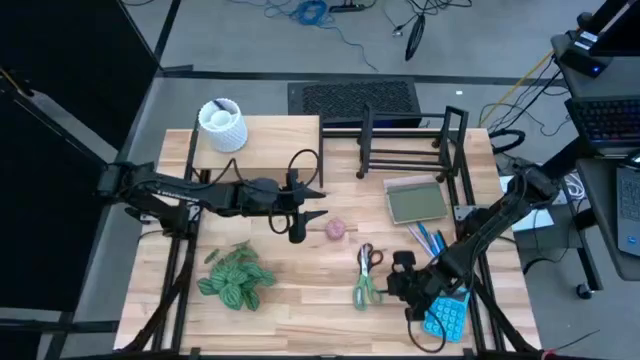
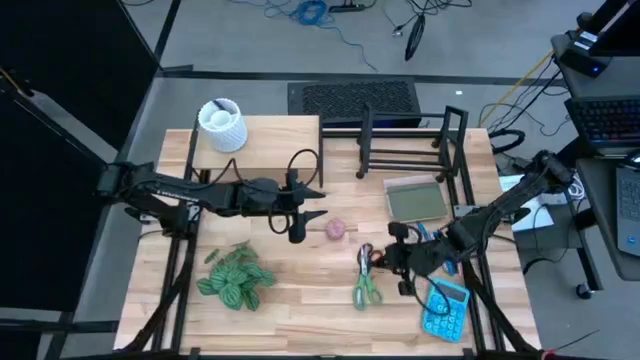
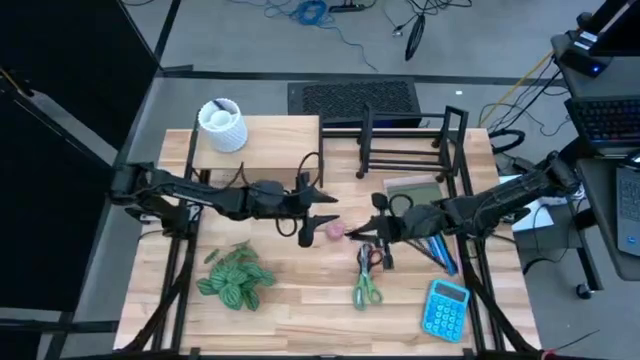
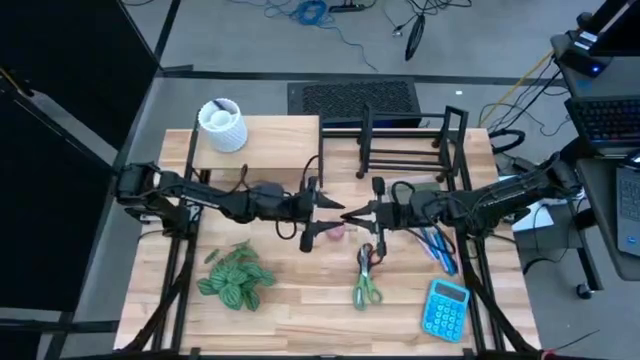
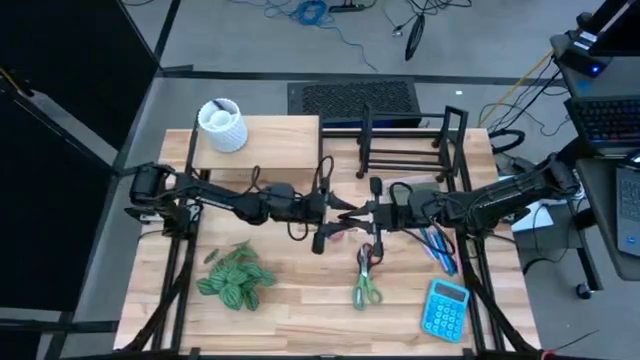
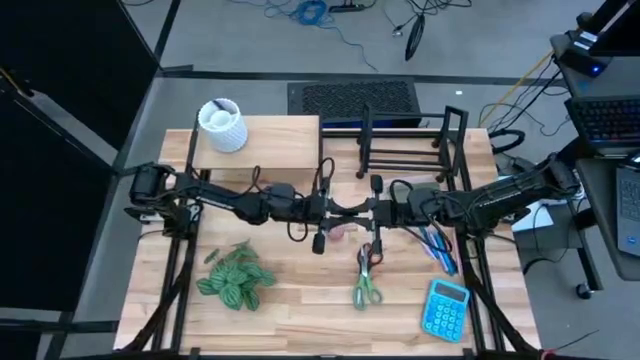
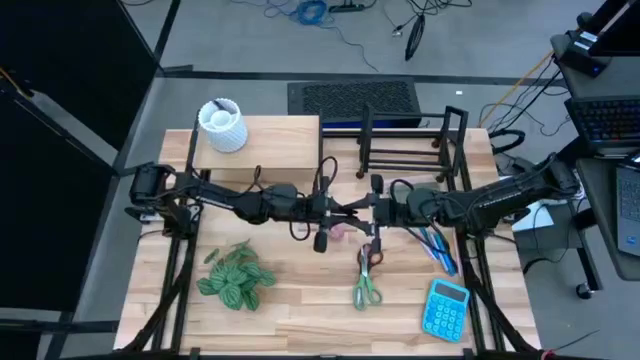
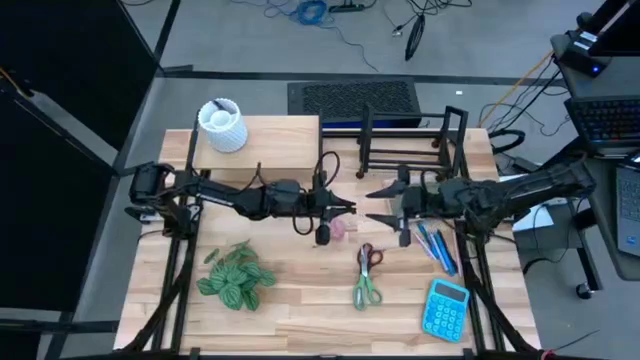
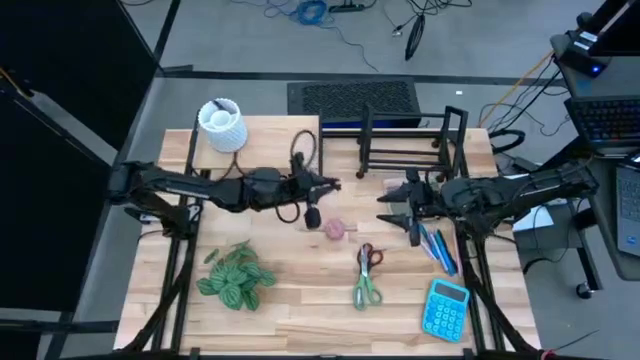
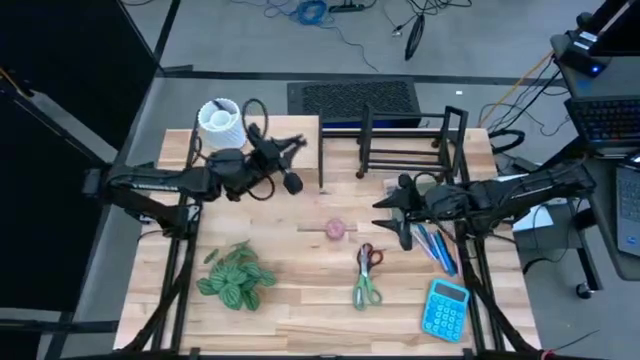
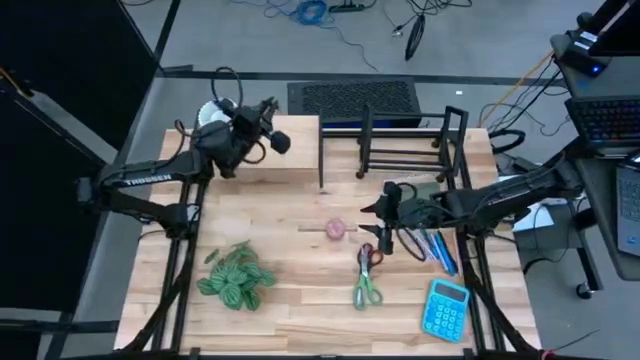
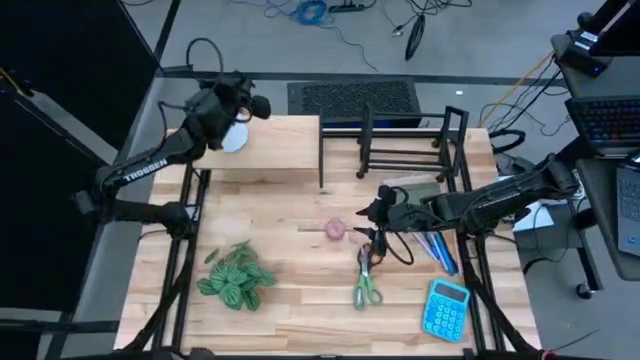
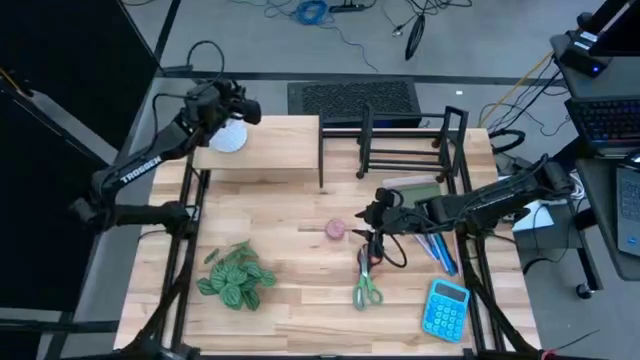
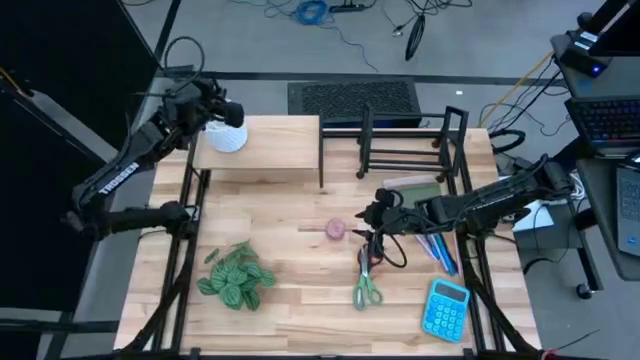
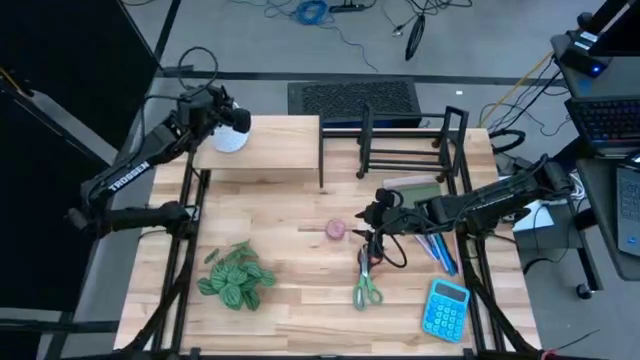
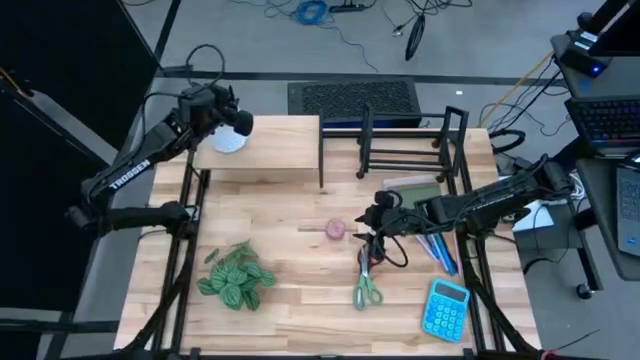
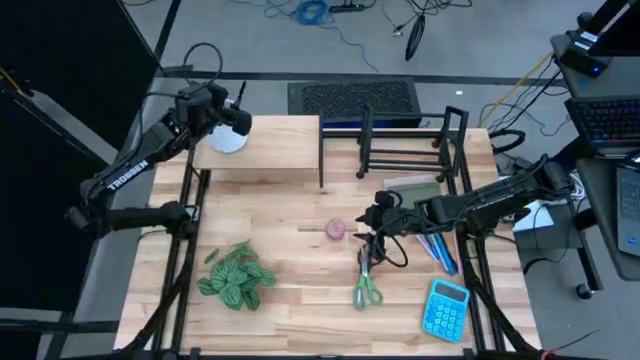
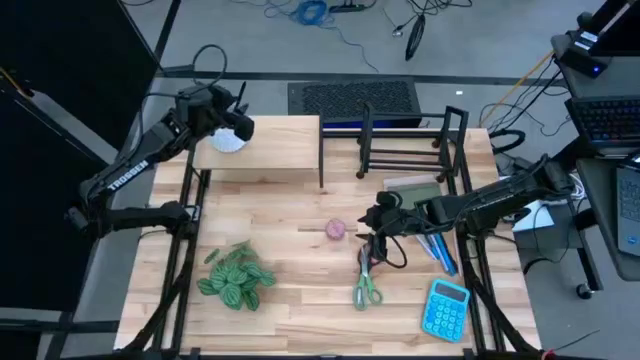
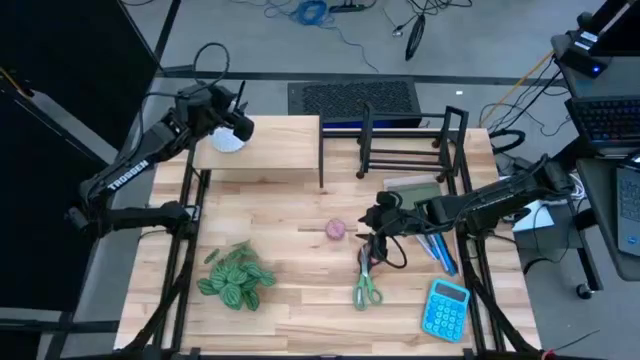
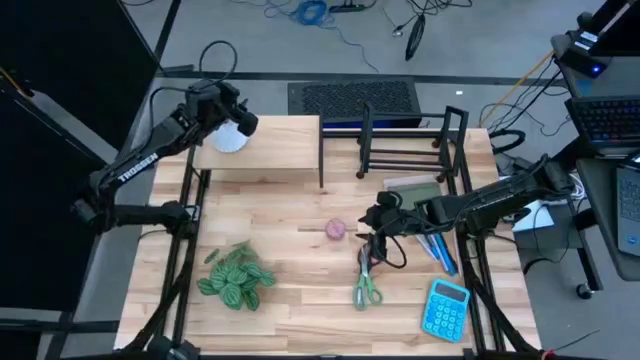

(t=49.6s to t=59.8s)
Task: Stock shelves
Put the black pen into the white pen holder

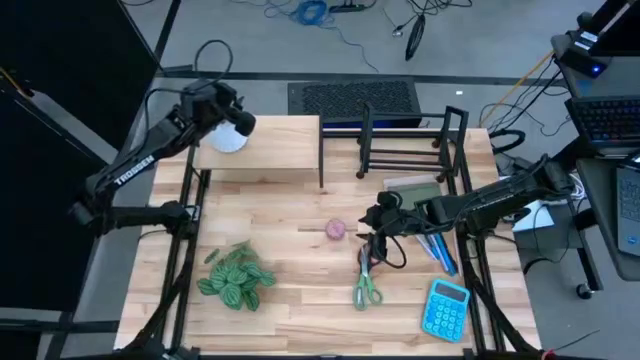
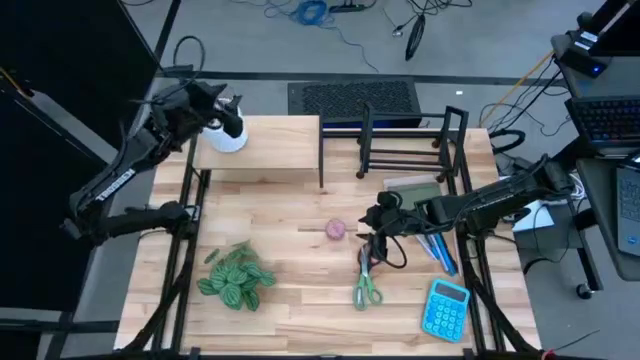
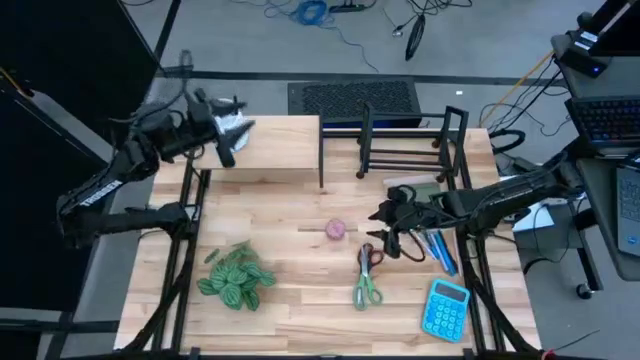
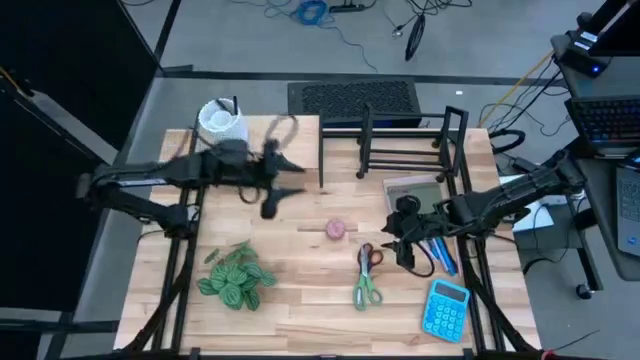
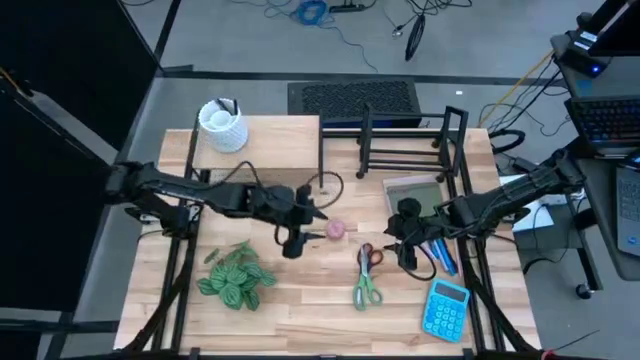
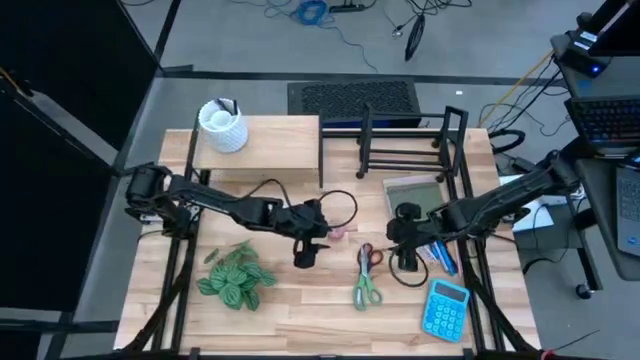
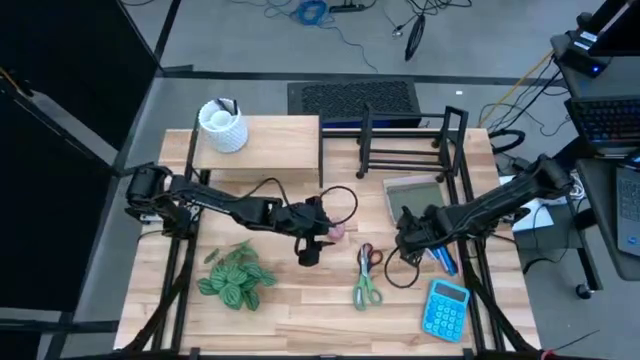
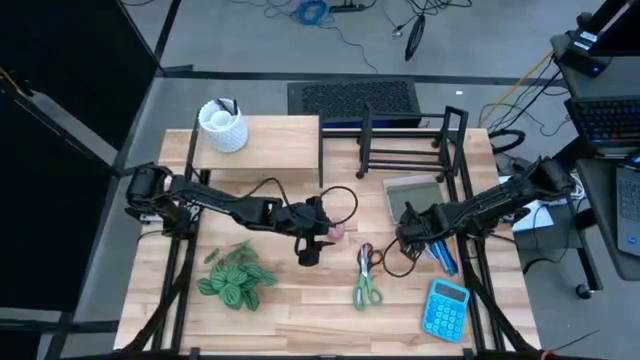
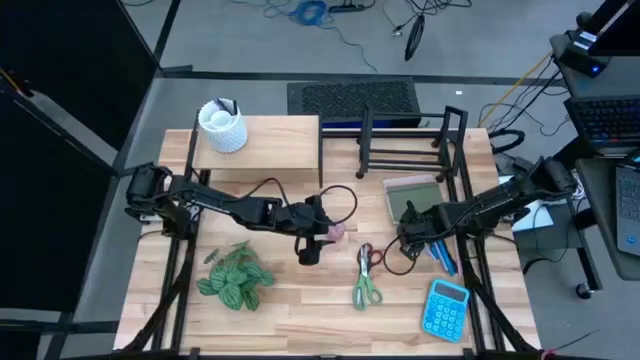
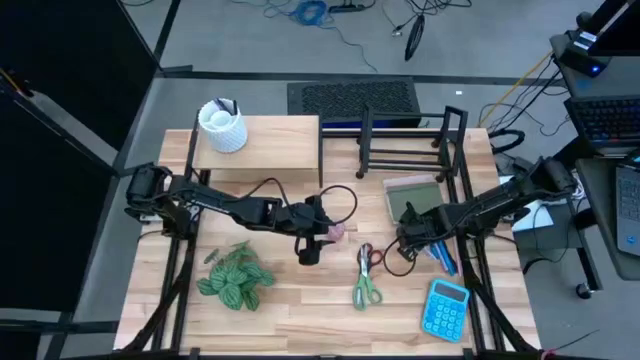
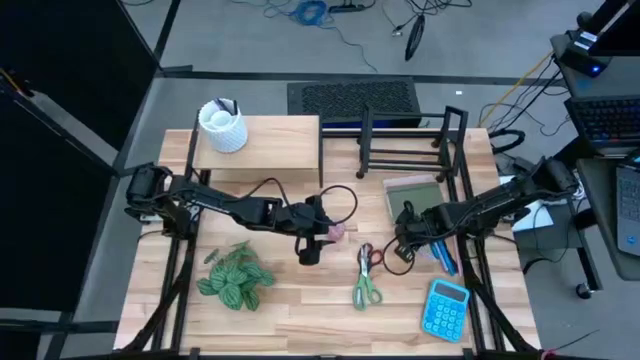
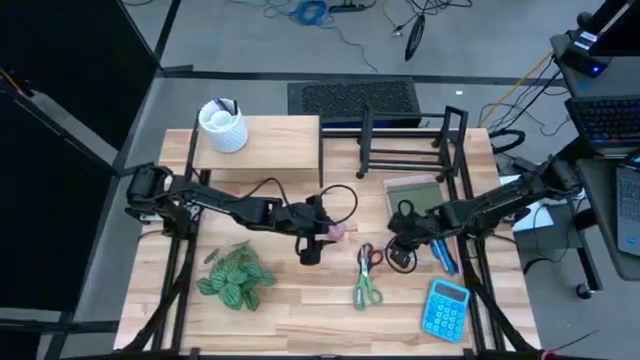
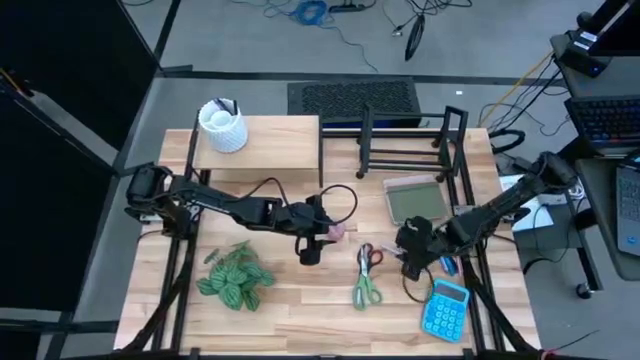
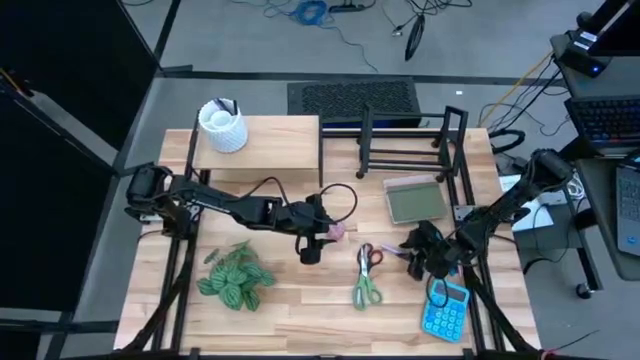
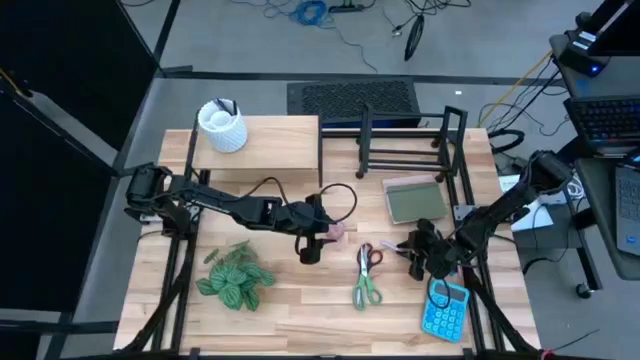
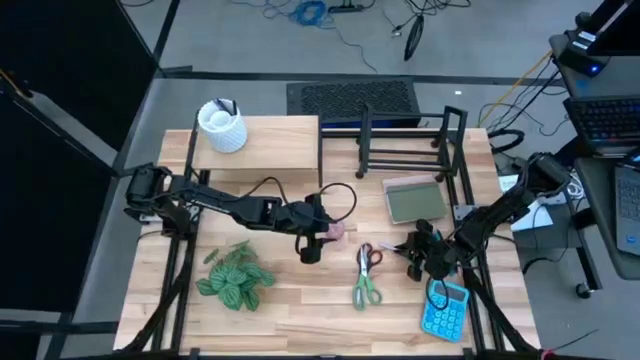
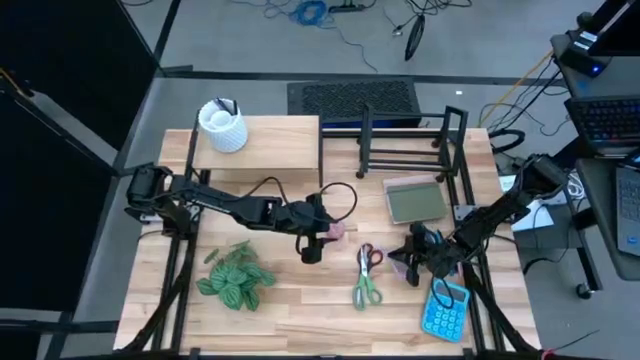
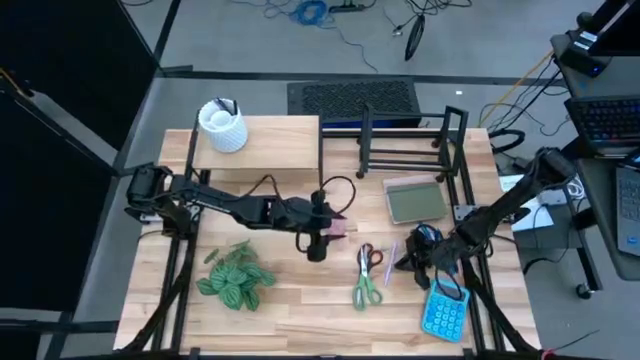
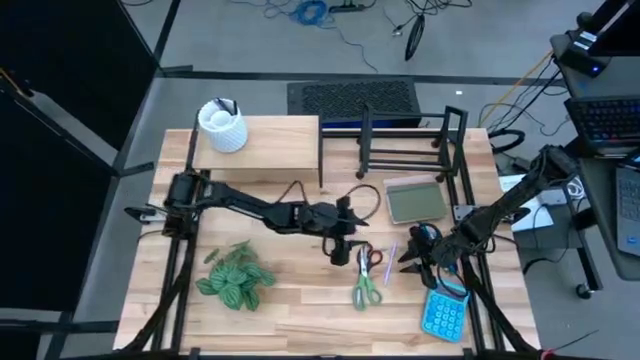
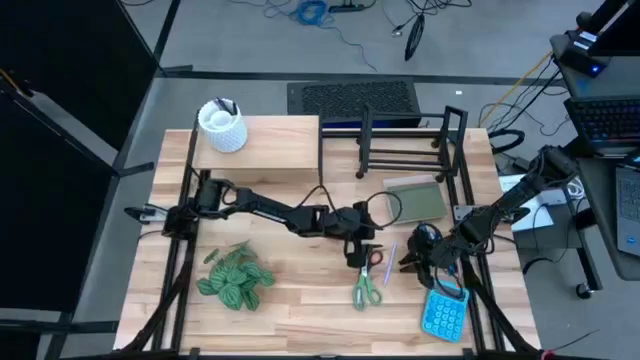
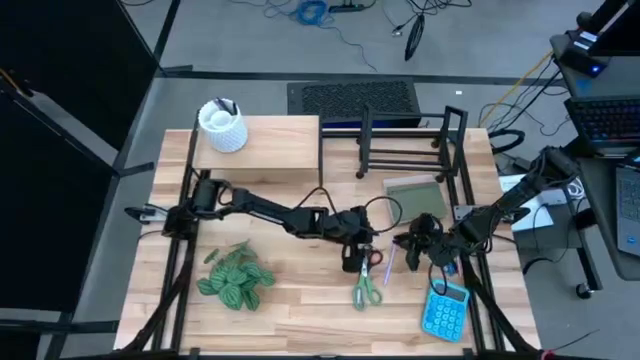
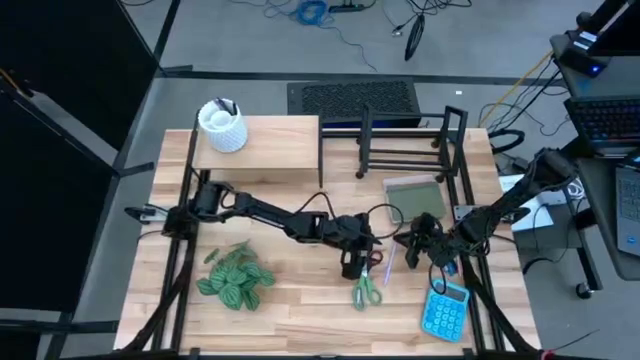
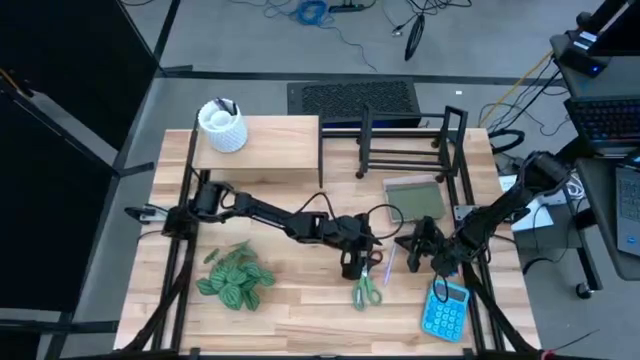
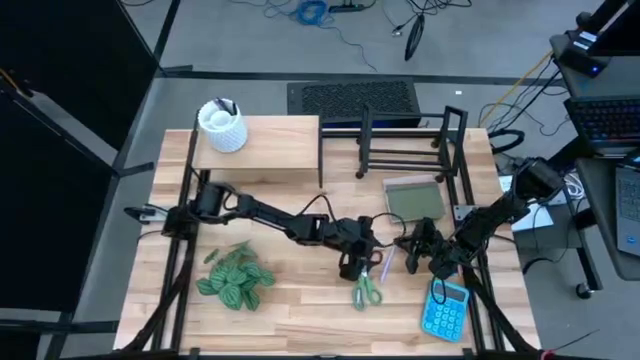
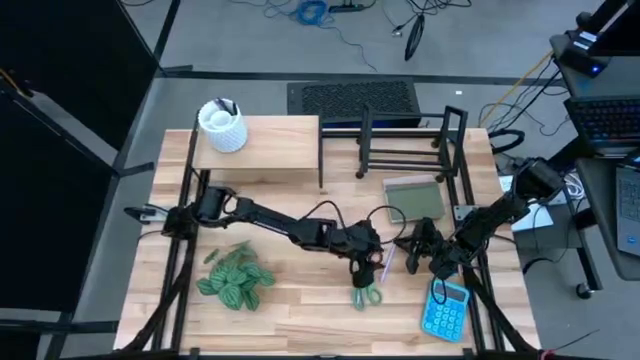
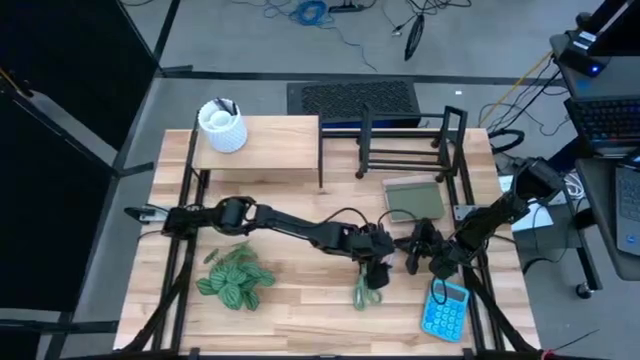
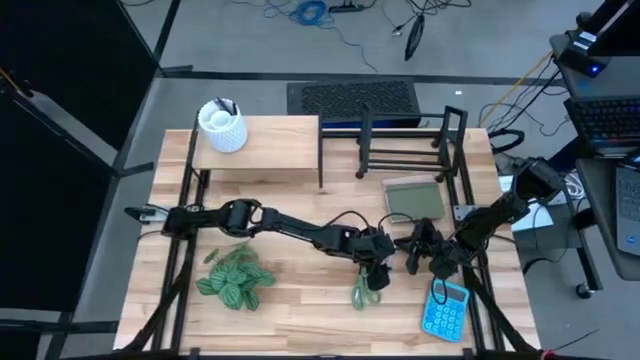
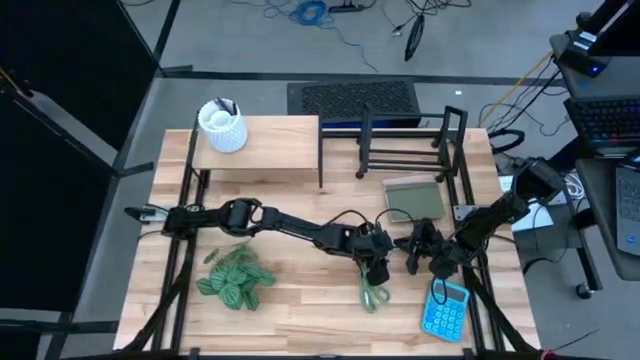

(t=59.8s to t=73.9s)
Put the purple pen into the white pen holder
